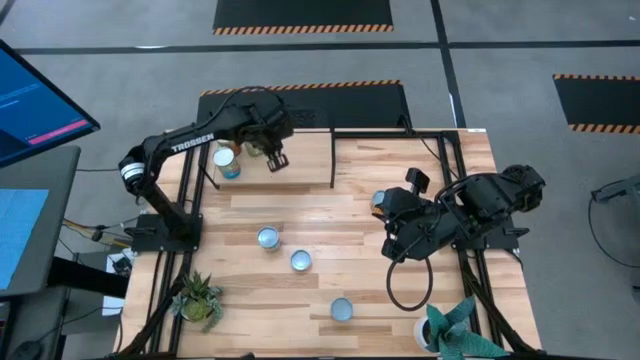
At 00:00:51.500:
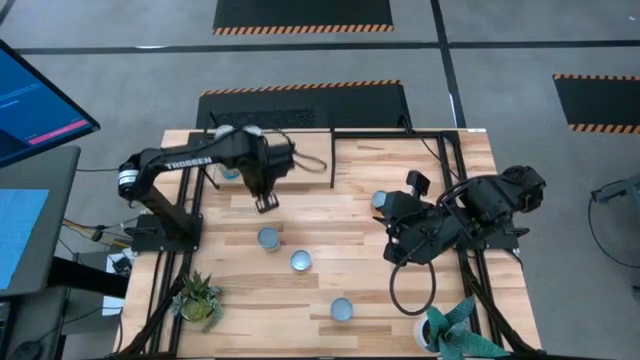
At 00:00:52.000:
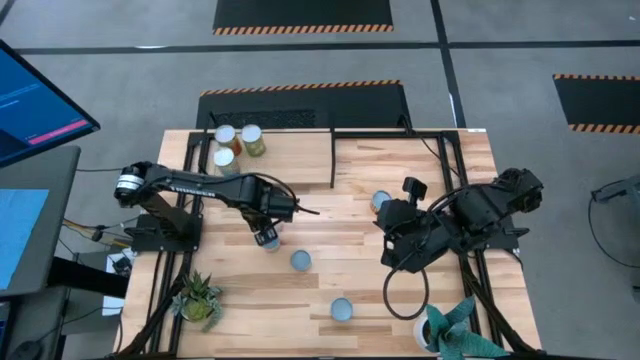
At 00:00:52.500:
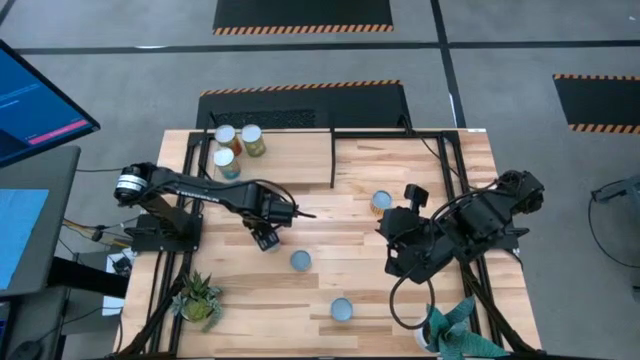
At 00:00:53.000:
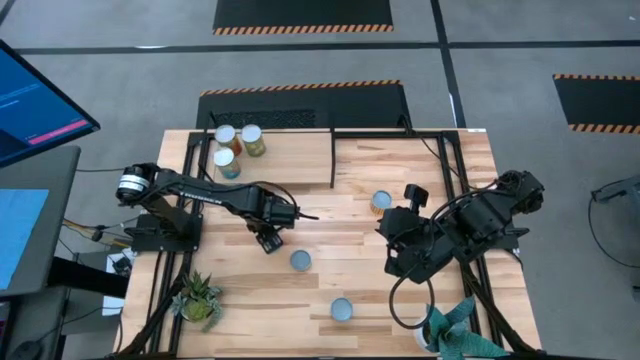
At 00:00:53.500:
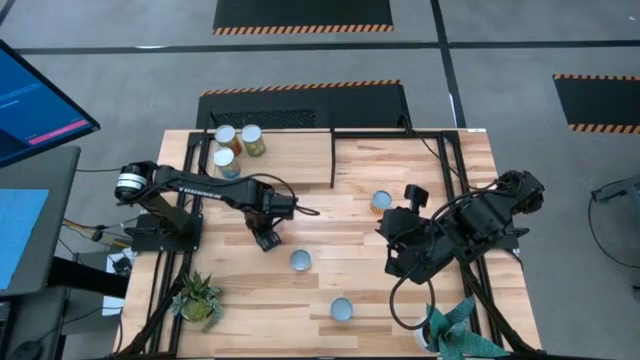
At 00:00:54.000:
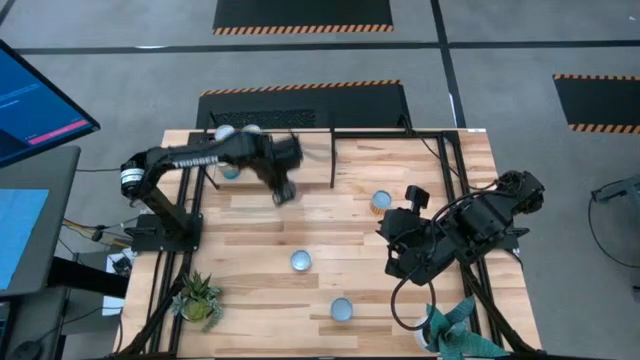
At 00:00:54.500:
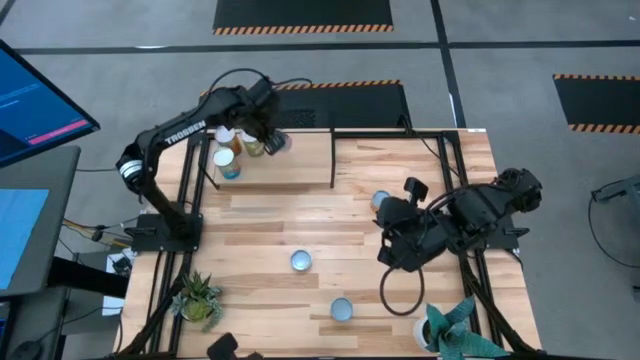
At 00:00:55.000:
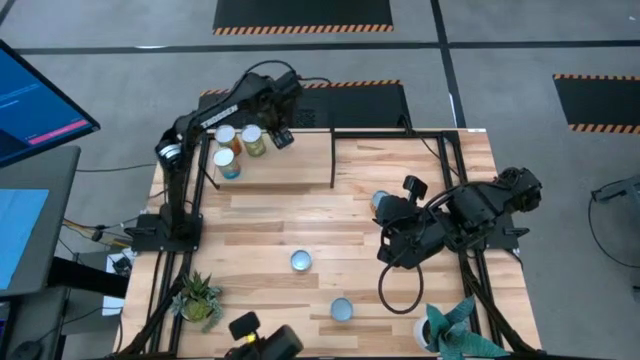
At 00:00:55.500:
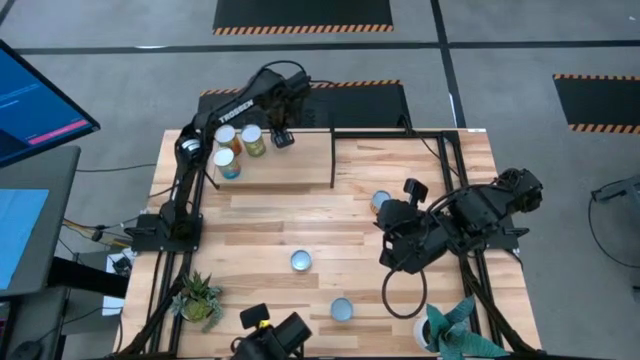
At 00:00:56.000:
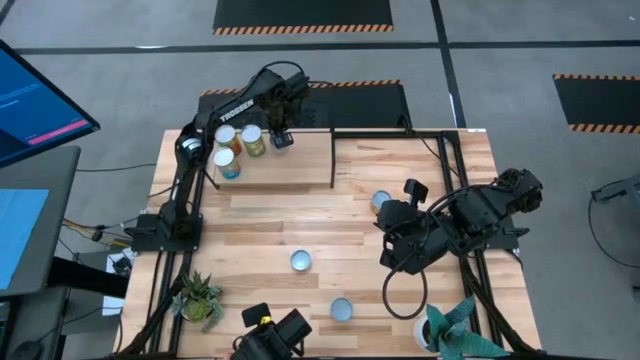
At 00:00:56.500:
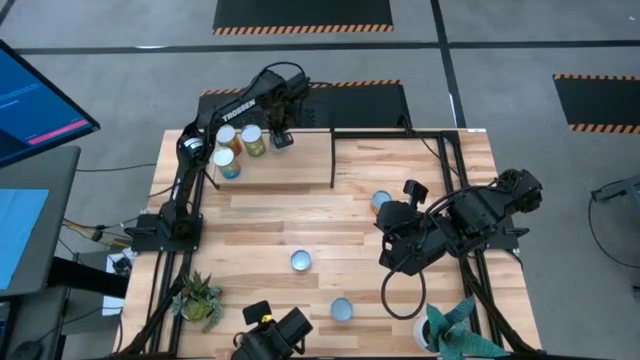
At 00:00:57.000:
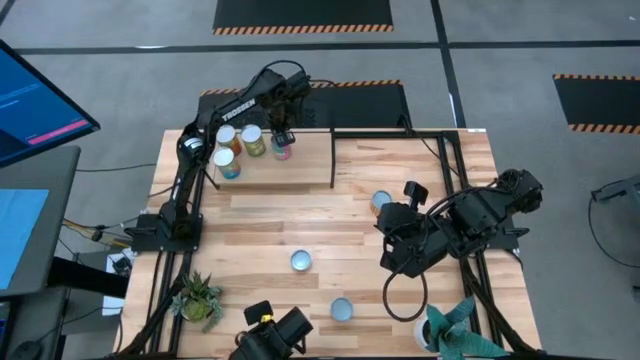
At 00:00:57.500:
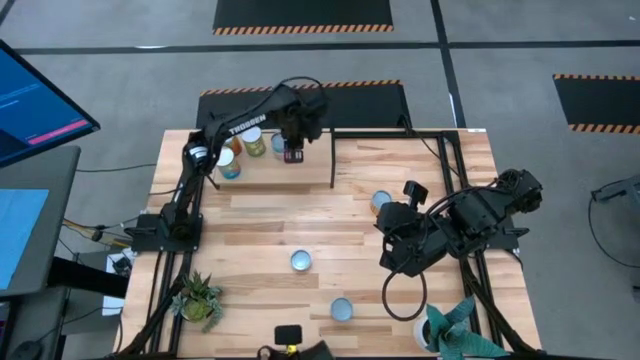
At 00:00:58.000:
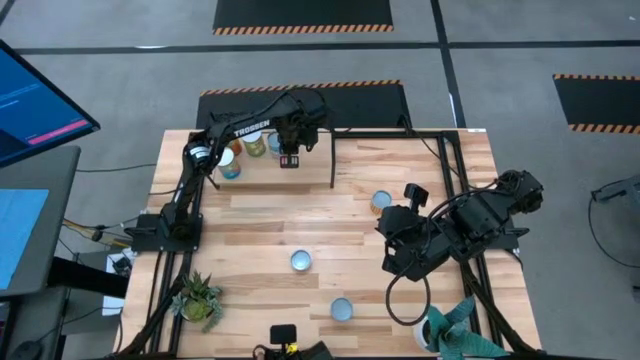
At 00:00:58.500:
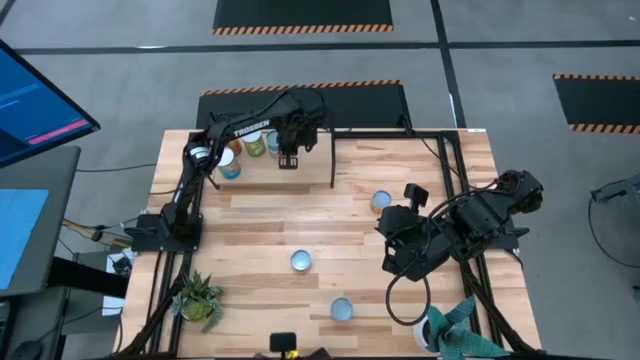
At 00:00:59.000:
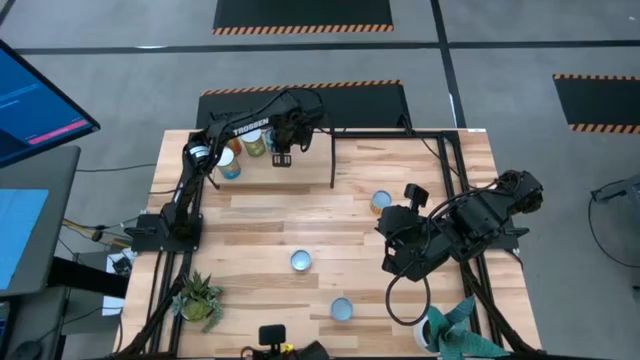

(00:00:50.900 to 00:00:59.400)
Task: Pick and place cans onto a shelf
Put the chicken soup can on the shelf aligned with the pears can

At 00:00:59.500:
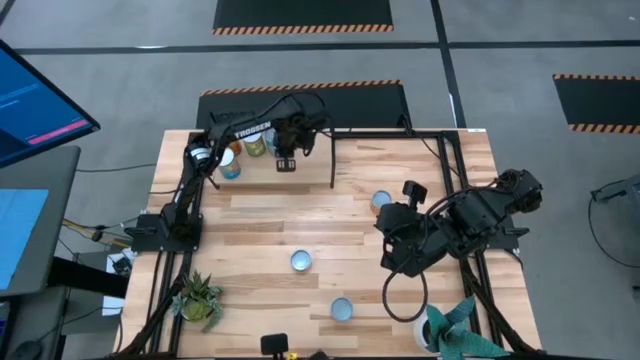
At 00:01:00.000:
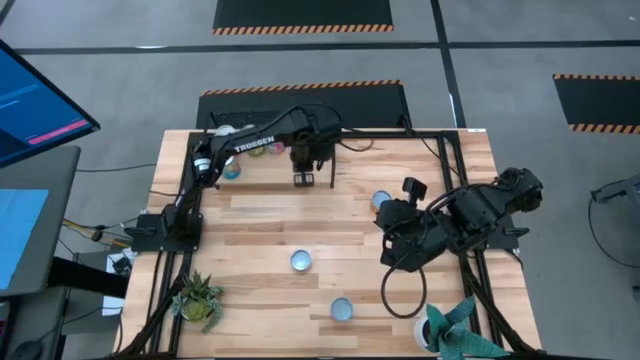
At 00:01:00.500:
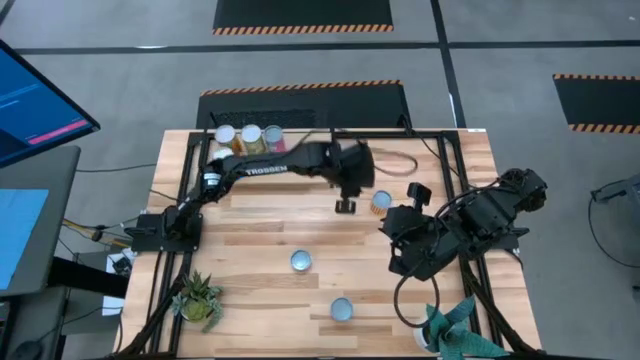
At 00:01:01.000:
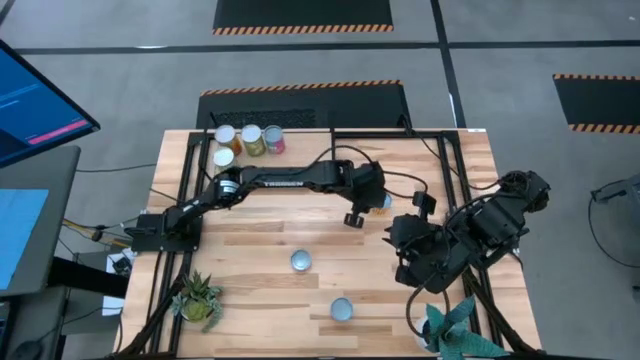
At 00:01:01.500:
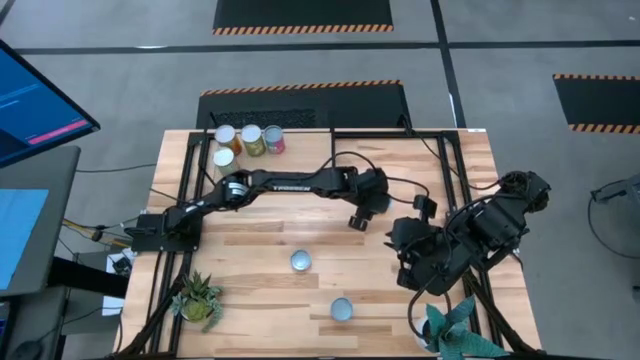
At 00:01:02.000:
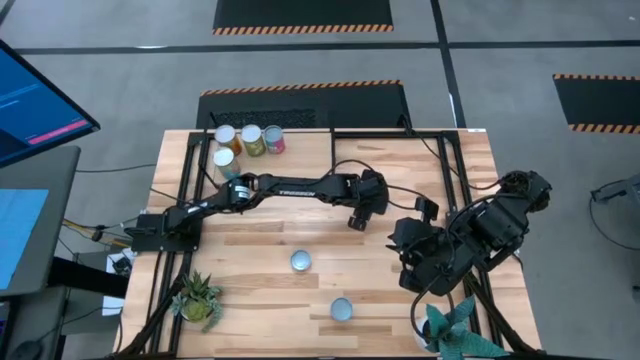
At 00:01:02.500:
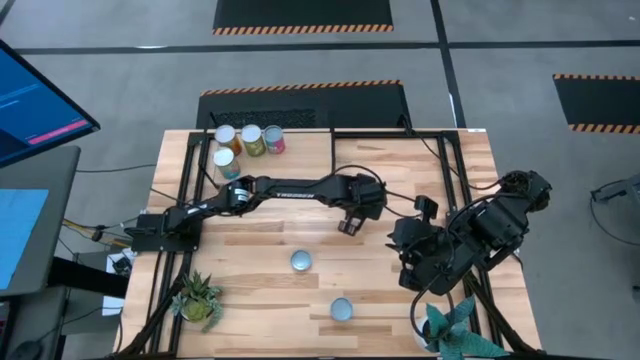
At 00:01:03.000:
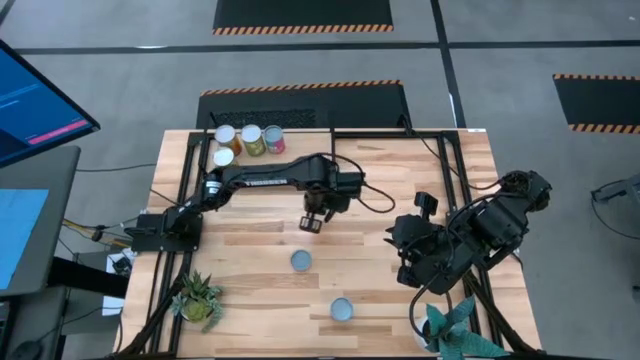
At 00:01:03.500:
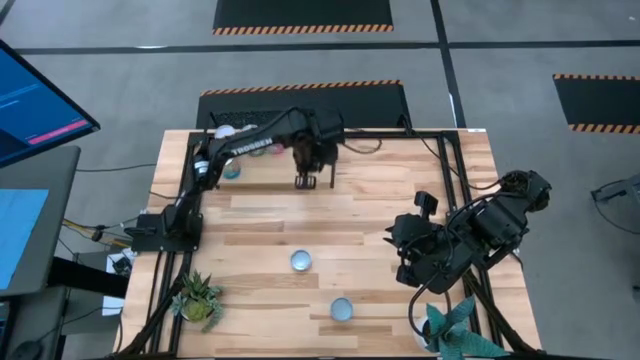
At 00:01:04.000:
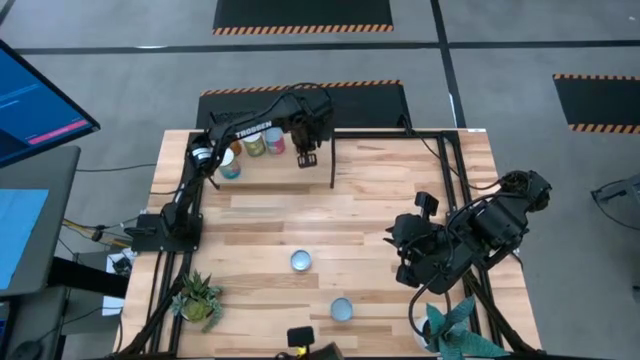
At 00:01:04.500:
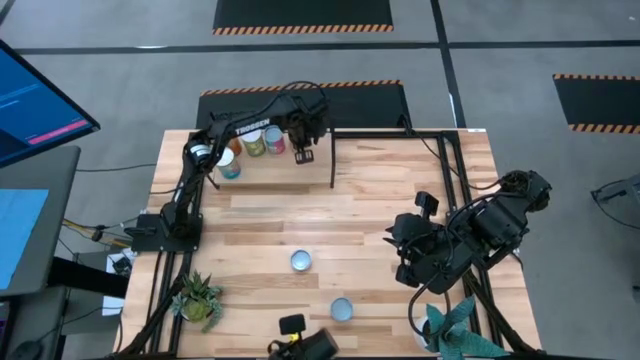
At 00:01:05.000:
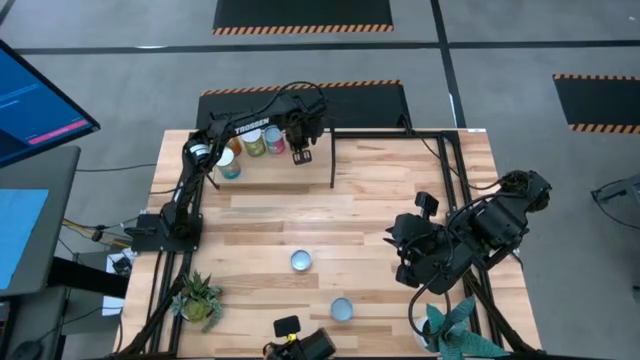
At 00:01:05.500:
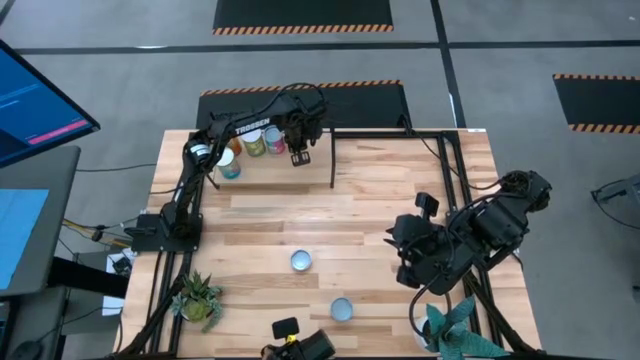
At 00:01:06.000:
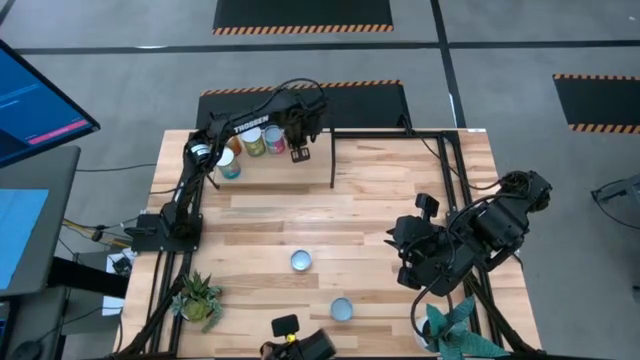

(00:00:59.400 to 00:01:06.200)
Put the yellow can on the shelf aligned with the chicken soup can

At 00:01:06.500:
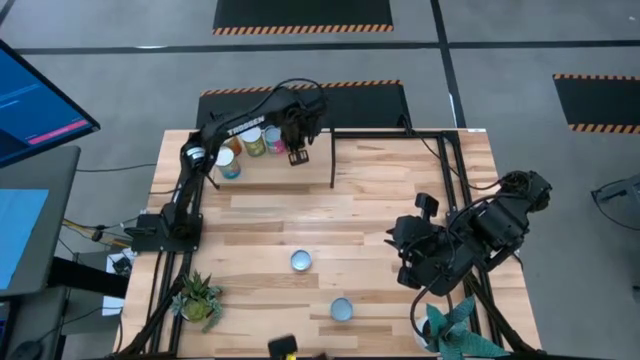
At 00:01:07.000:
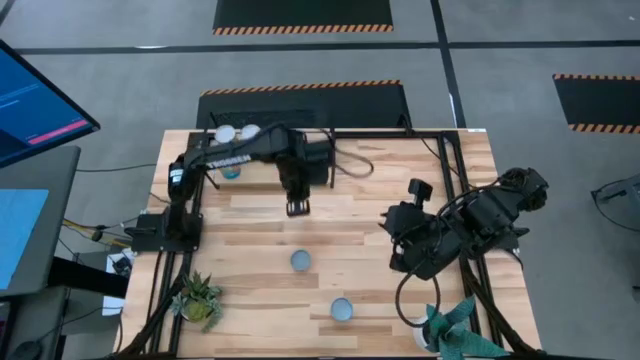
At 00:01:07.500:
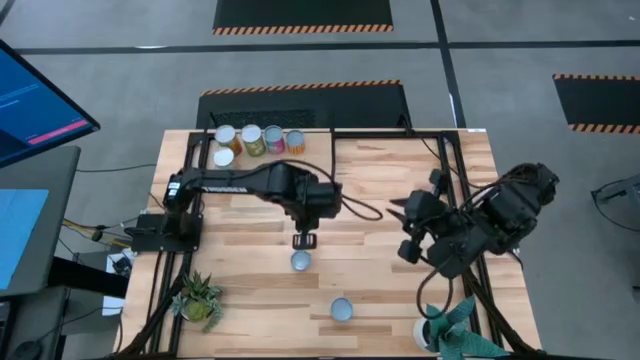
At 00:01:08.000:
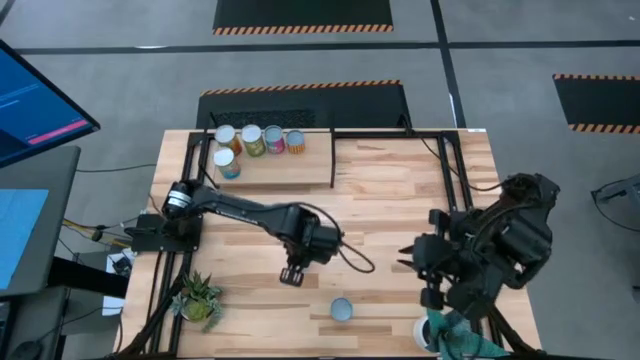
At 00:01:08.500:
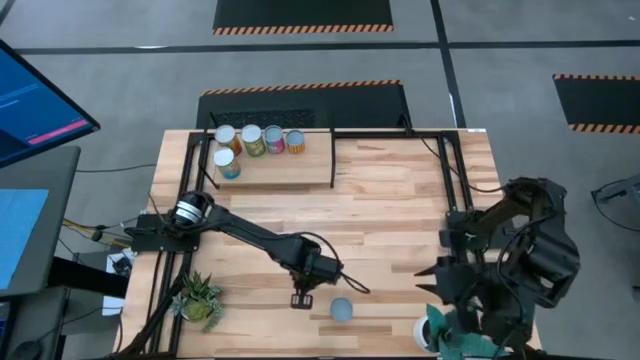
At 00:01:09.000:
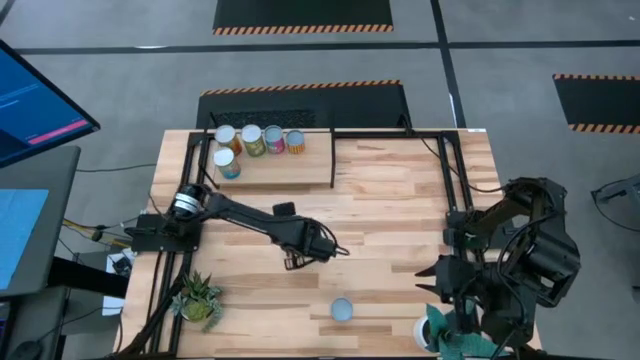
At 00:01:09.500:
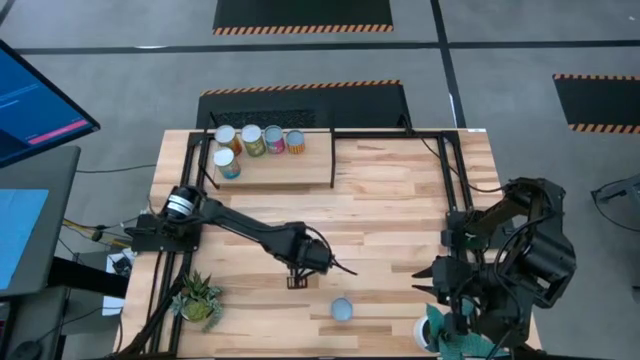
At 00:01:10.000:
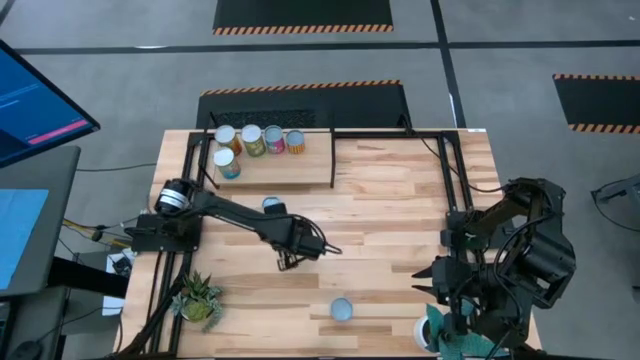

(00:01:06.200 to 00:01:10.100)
Move the pineapple rings can to the top left of the table

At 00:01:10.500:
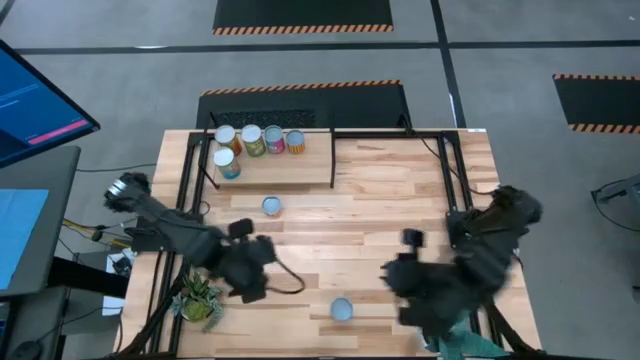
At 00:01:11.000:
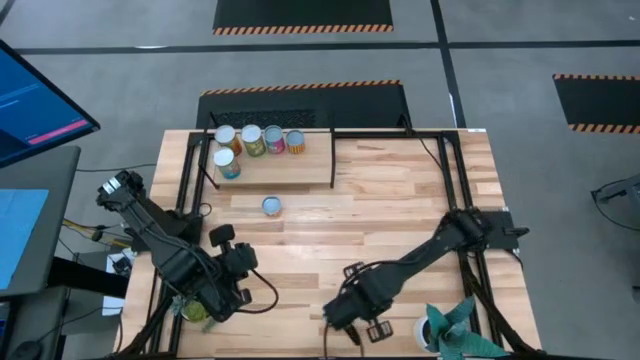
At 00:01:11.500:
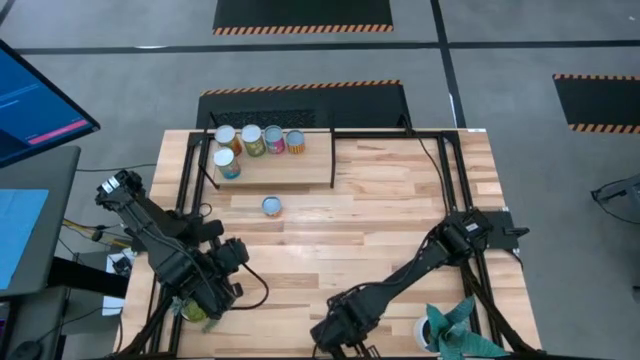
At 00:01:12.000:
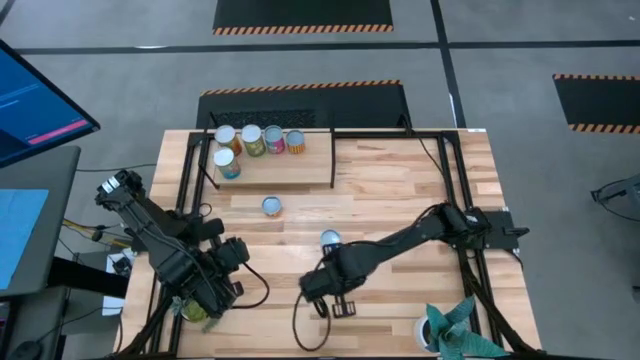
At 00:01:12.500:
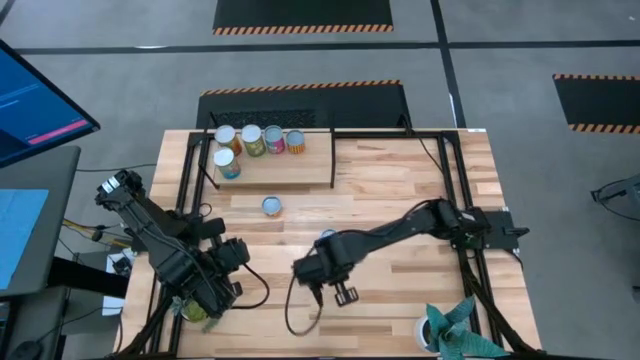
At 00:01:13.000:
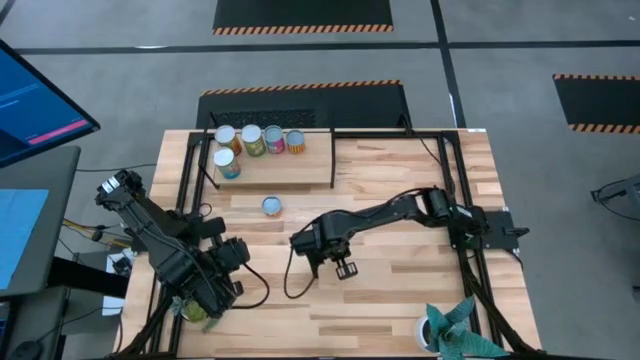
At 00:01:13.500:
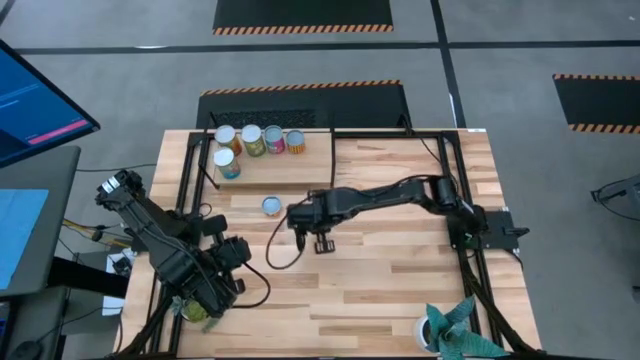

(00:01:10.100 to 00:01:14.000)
Move the corn can to the top middle of the table
